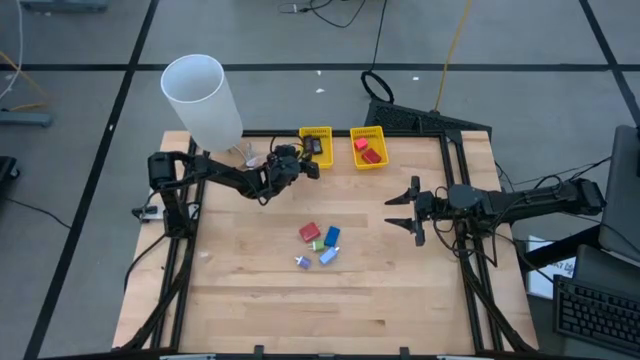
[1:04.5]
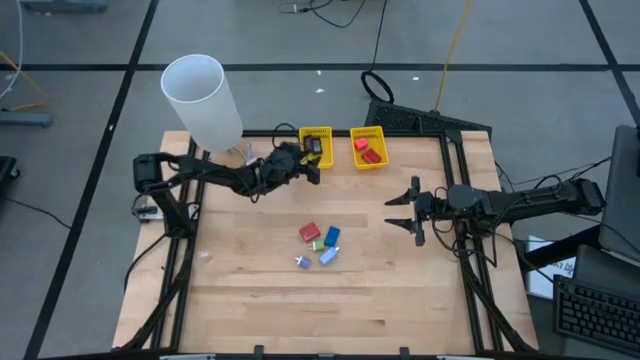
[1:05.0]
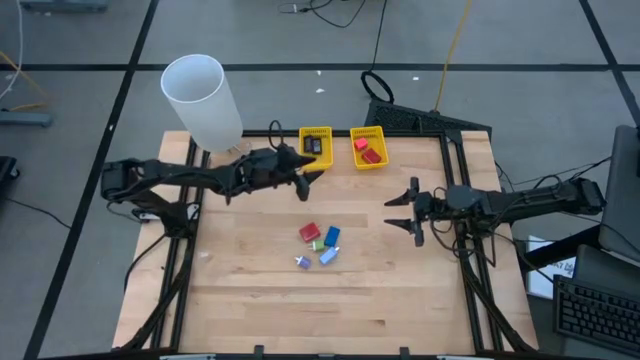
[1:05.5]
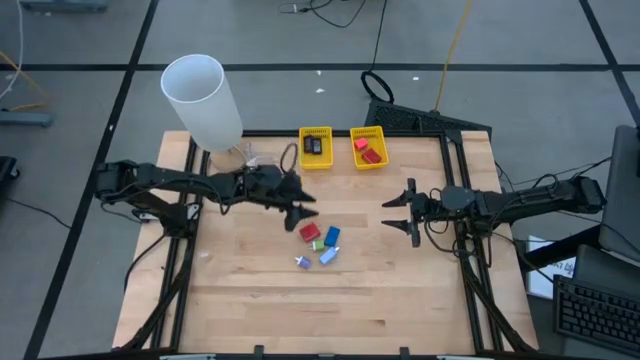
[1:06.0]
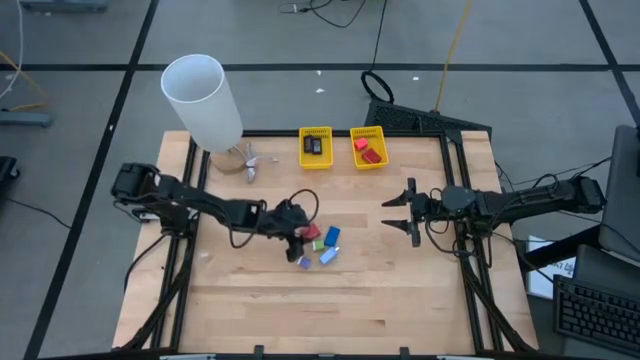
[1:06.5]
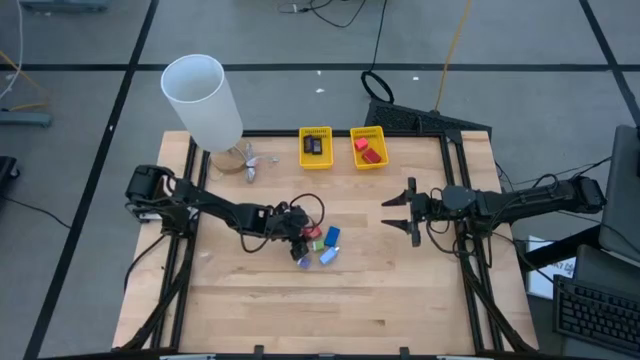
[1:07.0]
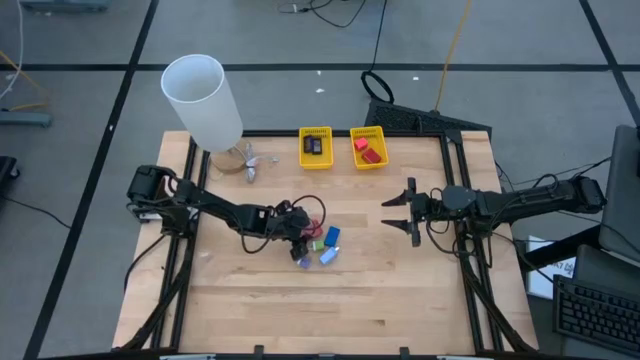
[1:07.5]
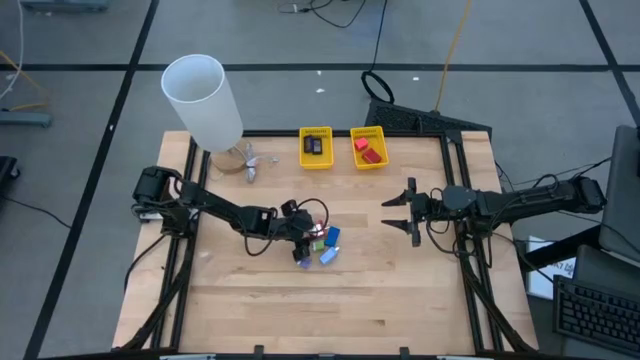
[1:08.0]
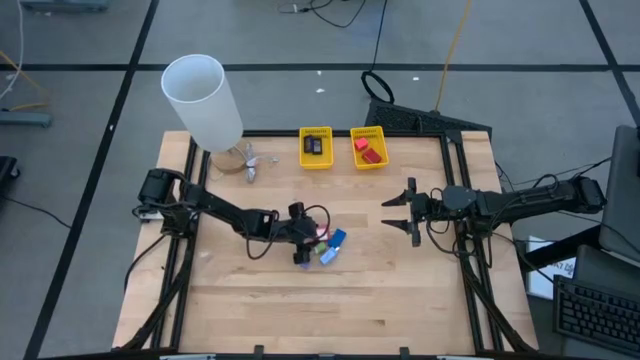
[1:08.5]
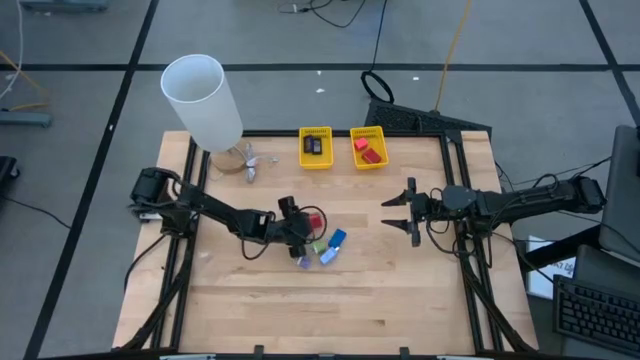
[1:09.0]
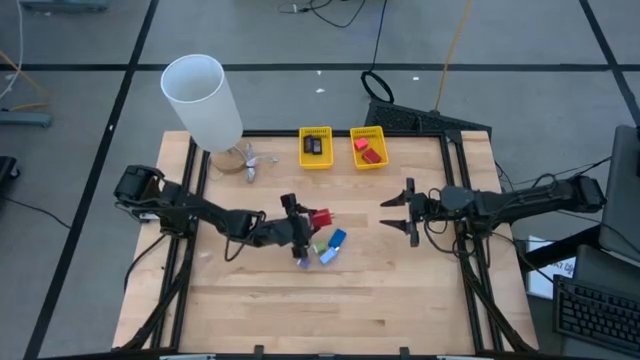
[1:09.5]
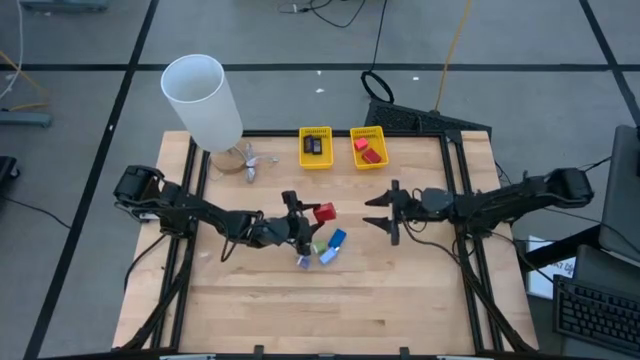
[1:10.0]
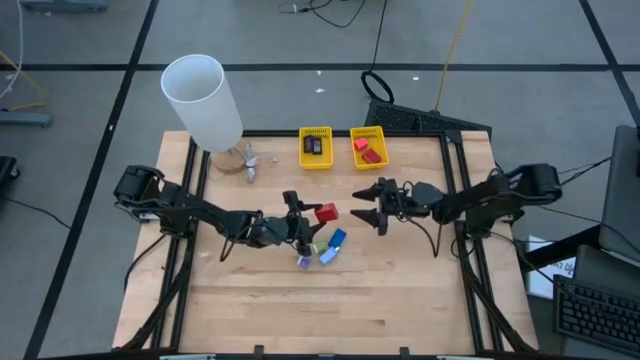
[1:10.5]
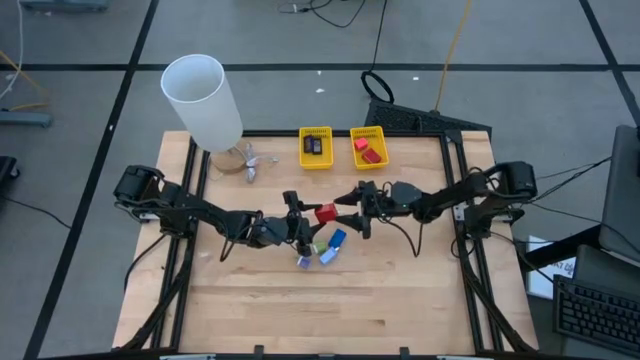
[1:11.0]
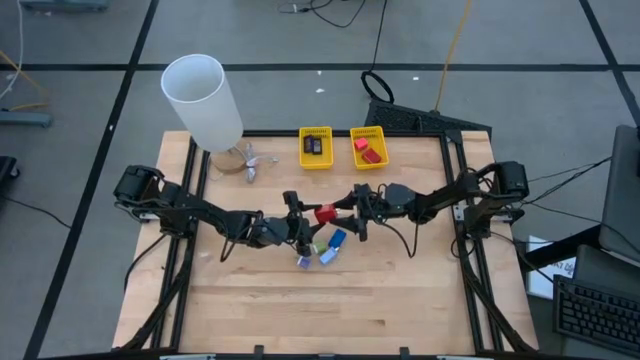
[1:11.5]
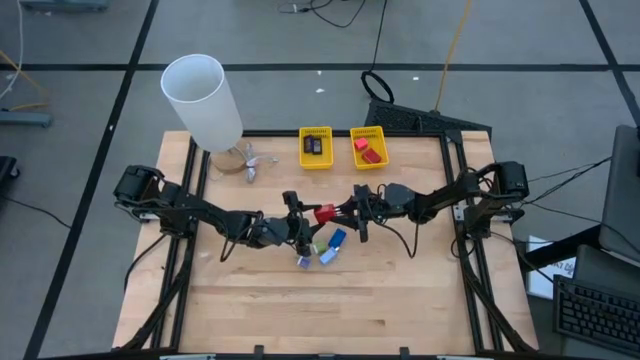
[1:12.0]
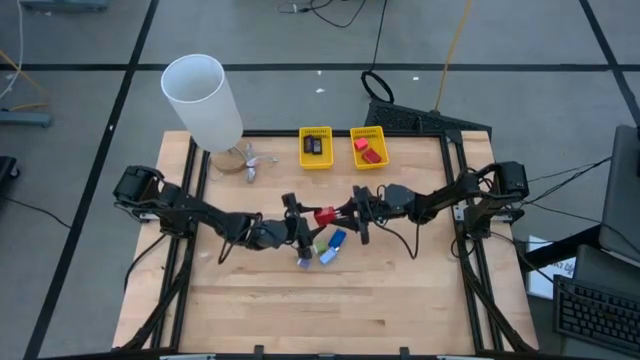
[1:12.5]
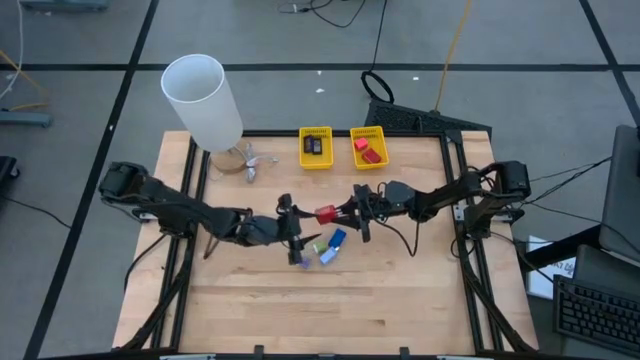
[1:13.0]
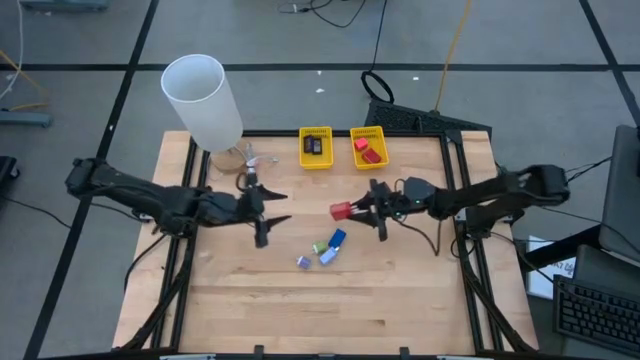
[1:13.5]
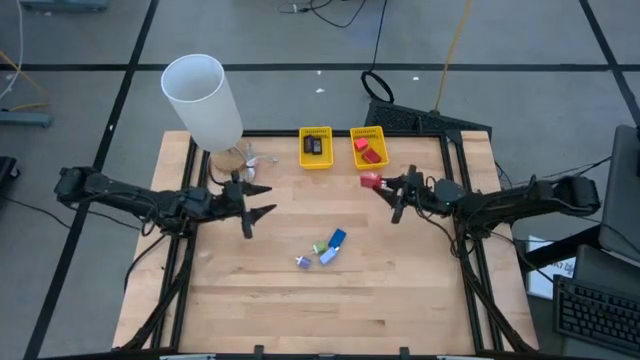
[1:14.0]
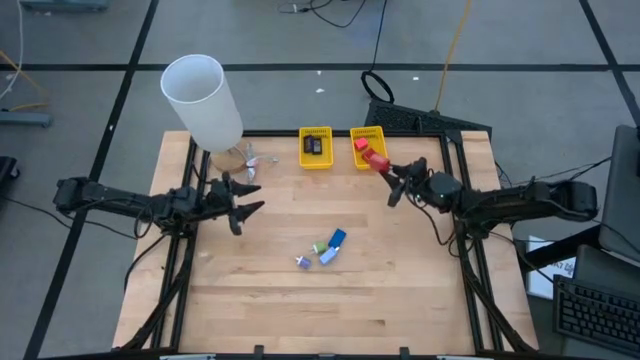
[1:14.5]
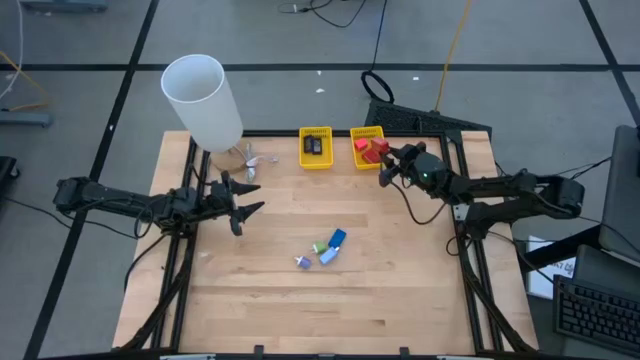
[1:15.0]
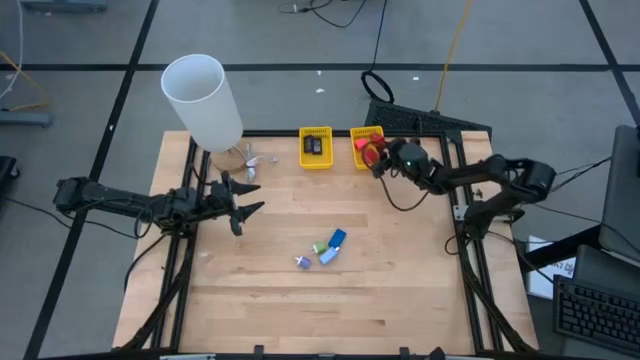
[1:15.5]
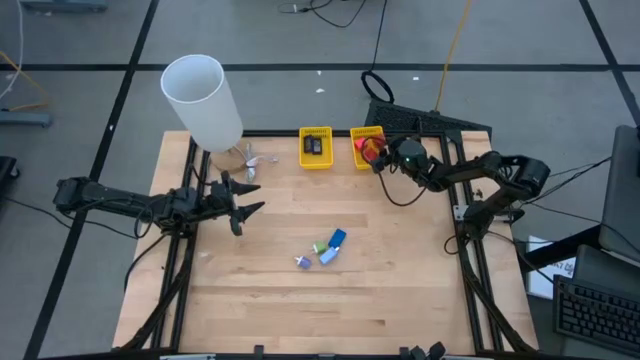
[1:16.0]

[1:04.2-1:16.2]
Task: Pick & Place Office items
Put the red charger adapter into the right yellow bin

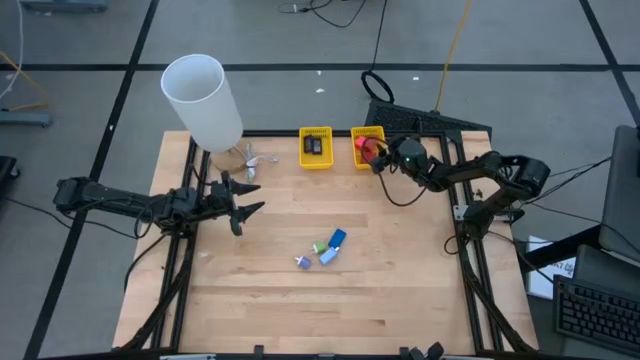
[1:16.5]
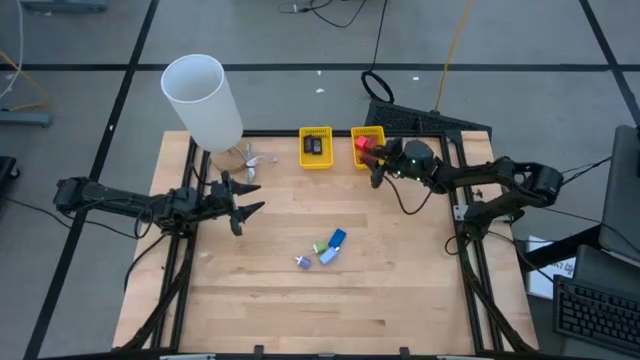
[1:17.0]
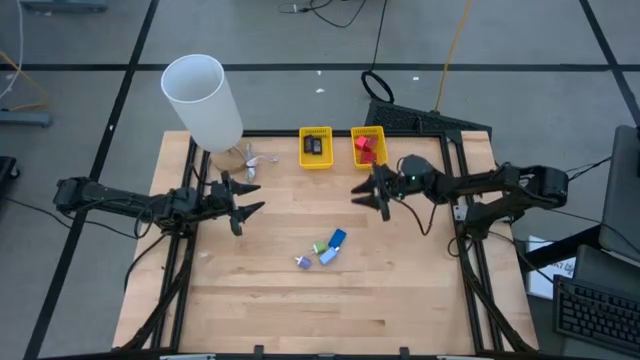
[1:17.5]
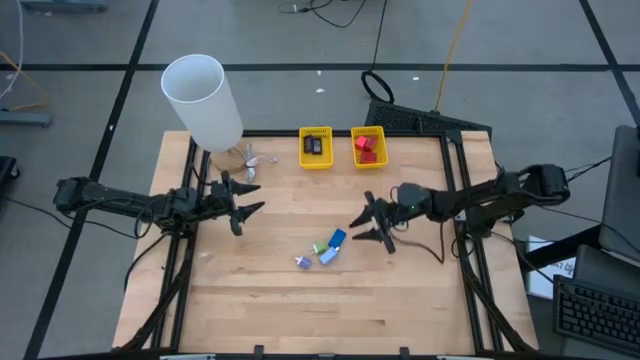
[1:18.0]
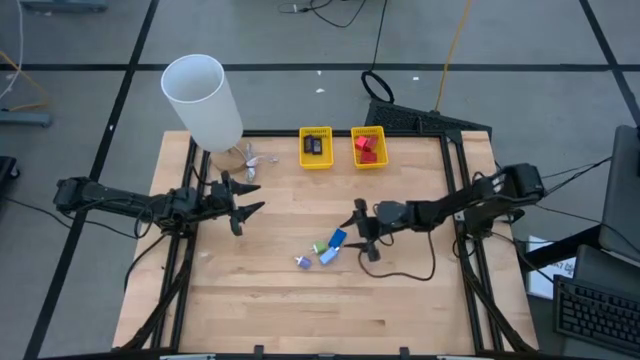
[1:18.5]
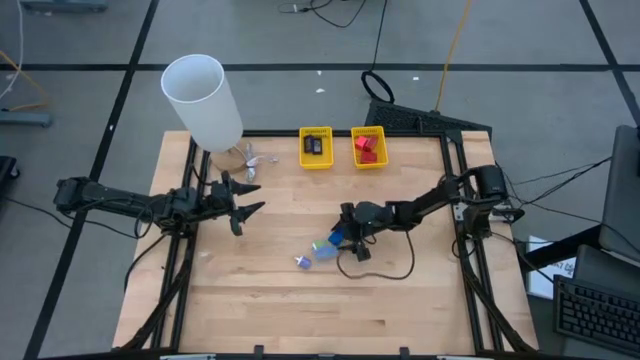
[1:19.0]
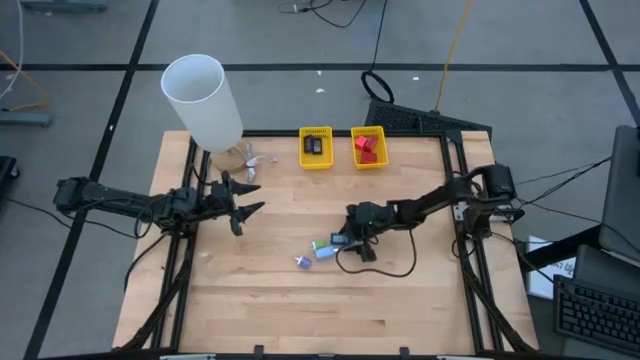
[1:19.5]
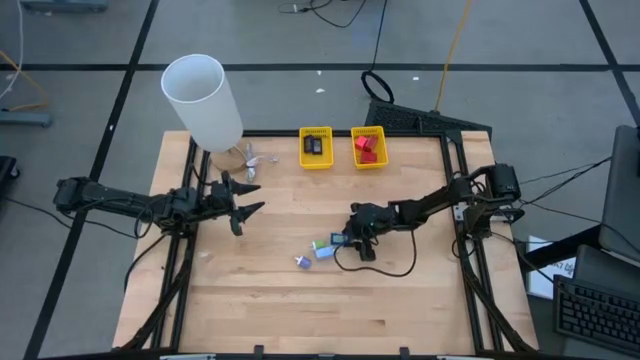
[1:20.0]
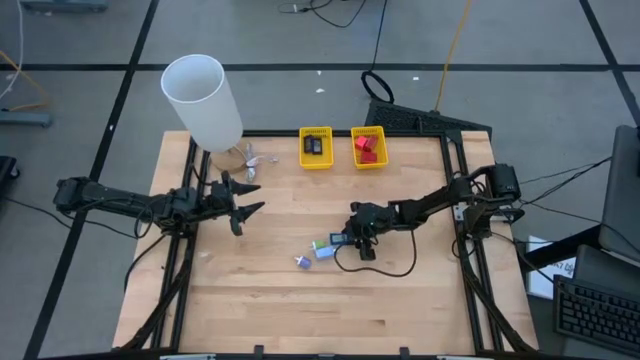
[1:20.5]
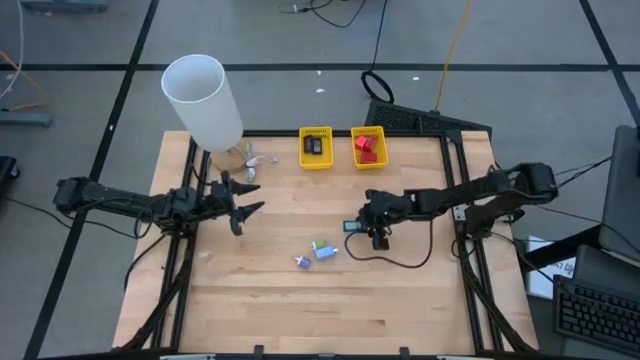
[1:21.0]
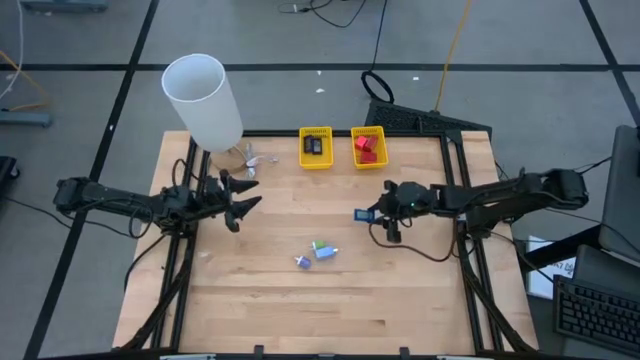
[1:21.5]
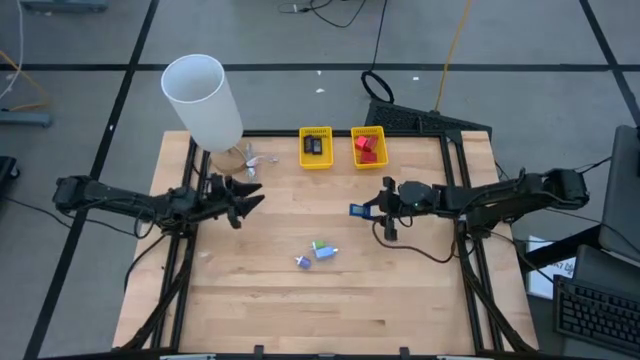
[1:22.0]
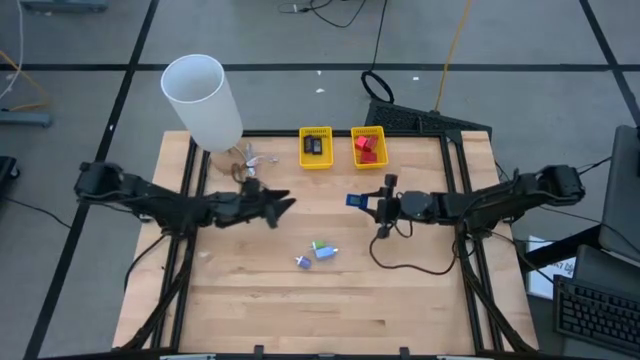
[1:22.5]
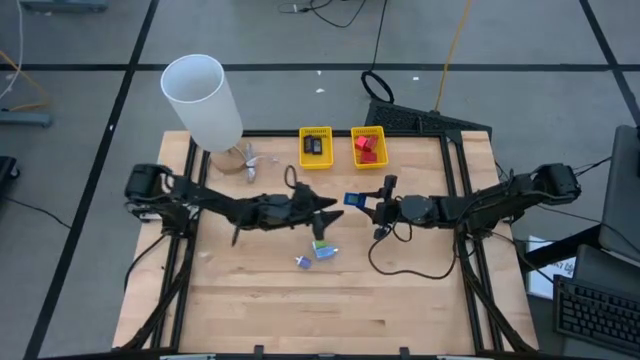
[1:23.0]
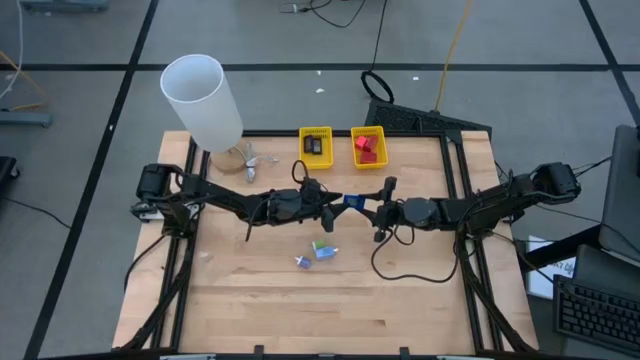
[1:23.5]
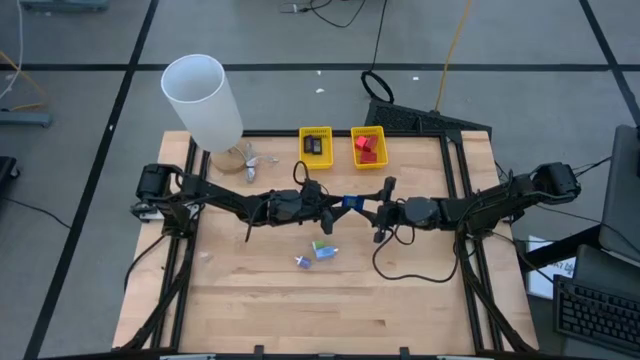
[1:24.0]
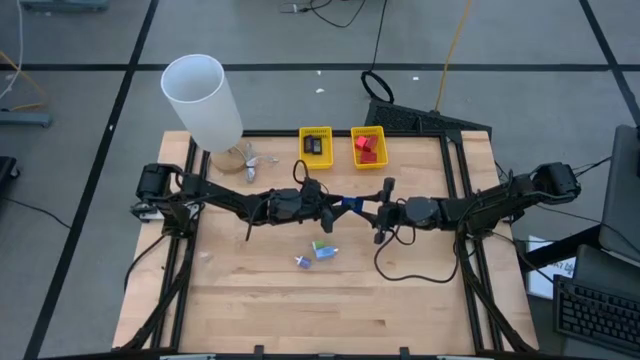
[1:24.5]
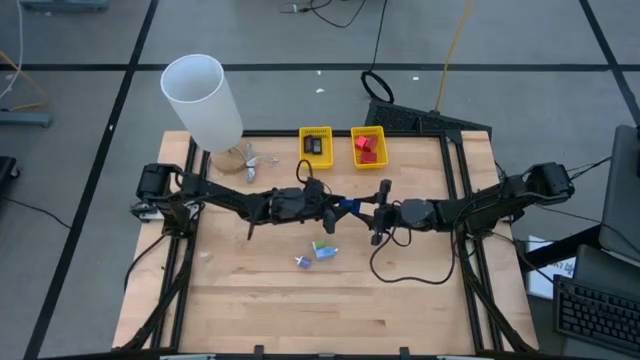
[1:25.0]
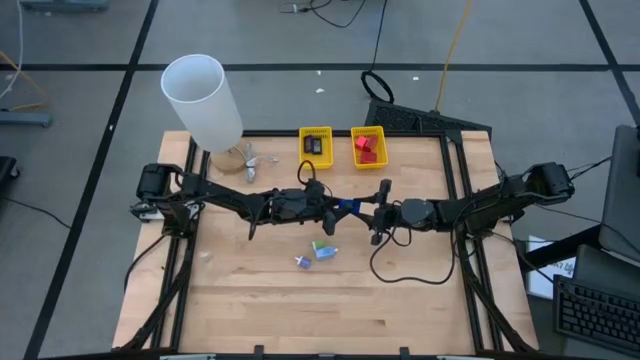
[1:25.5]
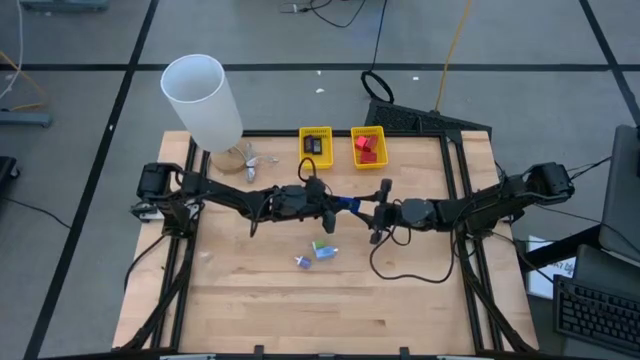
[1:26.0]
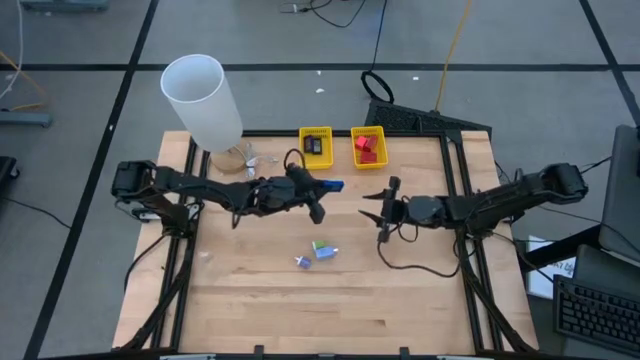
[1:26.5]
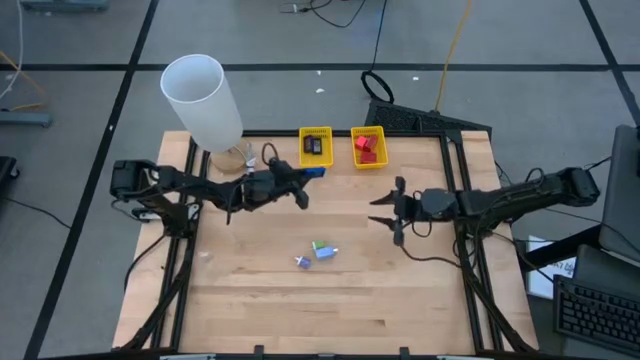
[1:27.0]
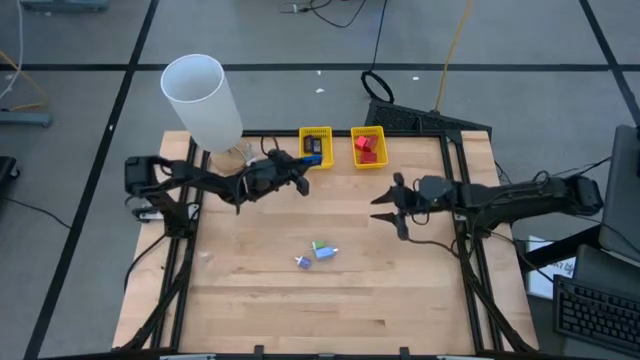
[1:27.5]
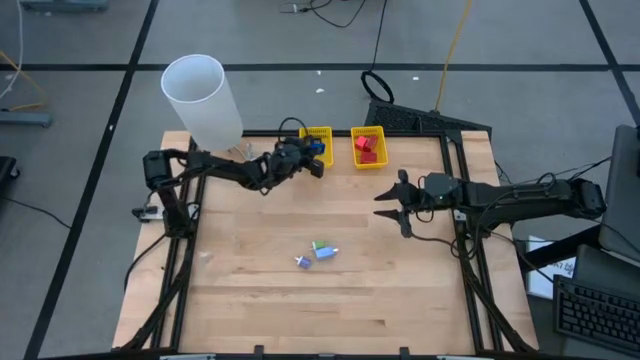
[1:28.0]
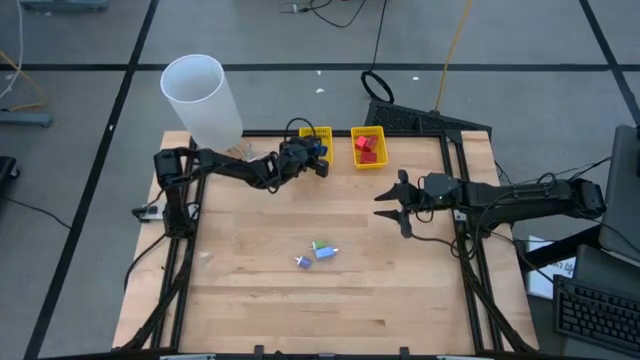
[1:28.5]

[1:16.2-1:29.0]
Put the blue digital clock into the left yellow bin
